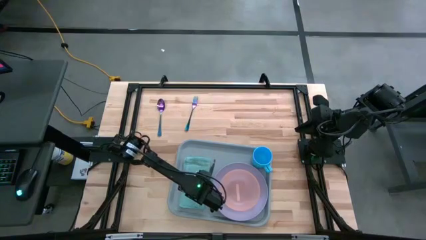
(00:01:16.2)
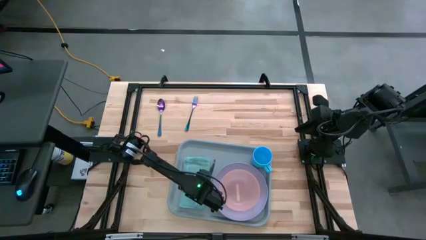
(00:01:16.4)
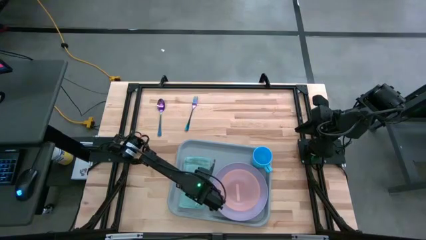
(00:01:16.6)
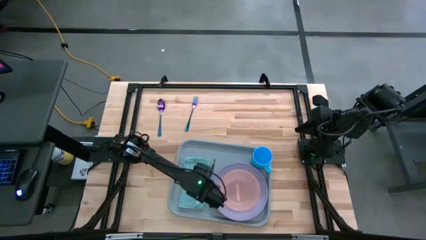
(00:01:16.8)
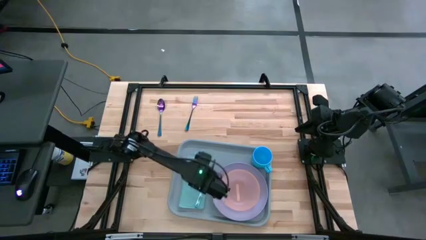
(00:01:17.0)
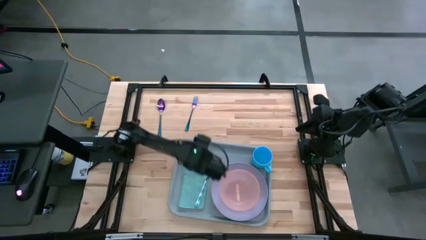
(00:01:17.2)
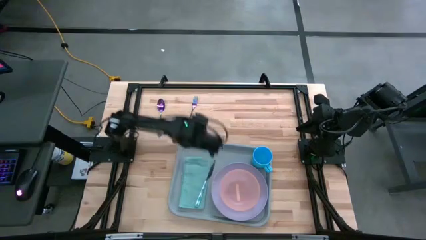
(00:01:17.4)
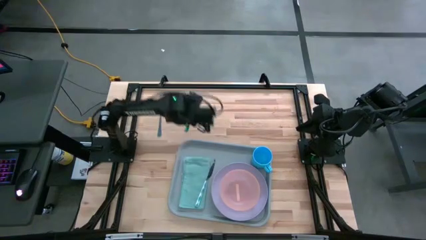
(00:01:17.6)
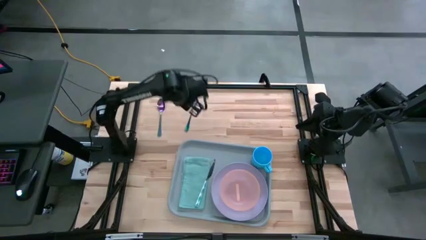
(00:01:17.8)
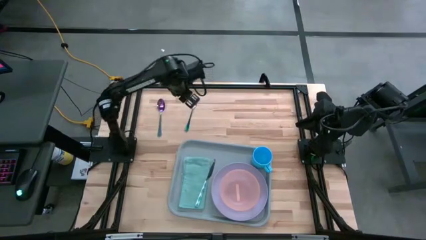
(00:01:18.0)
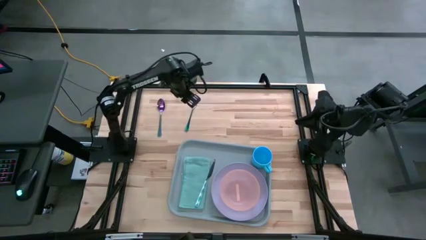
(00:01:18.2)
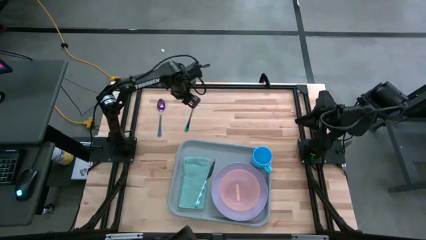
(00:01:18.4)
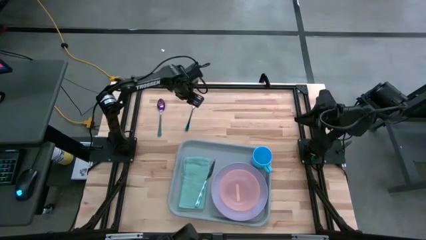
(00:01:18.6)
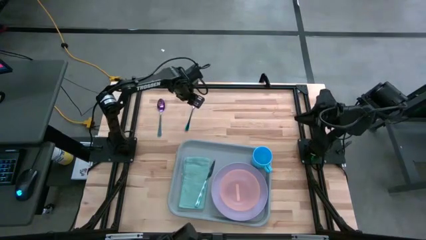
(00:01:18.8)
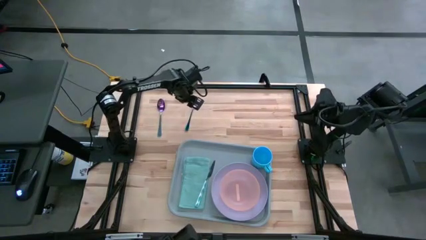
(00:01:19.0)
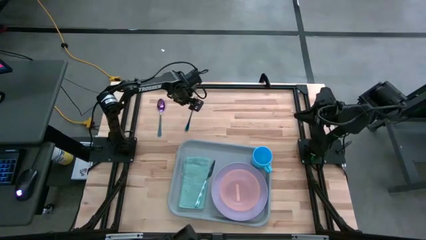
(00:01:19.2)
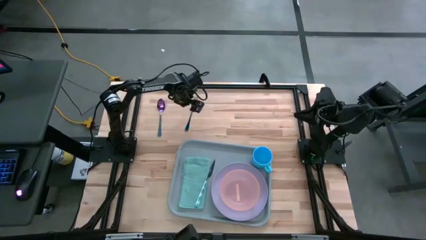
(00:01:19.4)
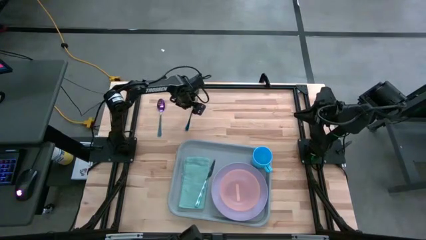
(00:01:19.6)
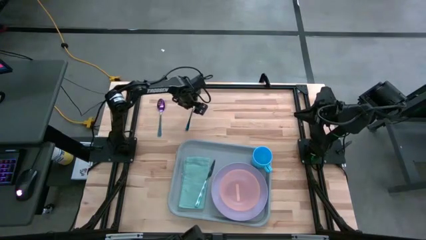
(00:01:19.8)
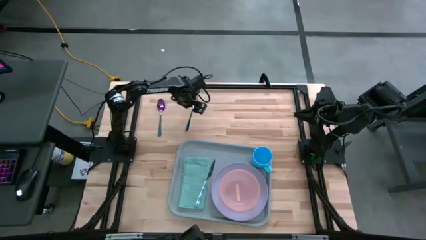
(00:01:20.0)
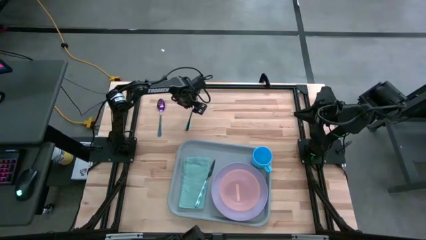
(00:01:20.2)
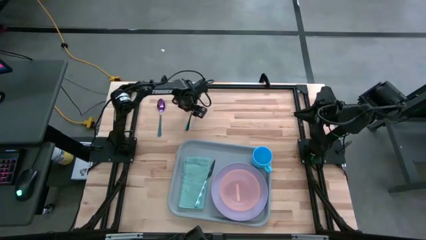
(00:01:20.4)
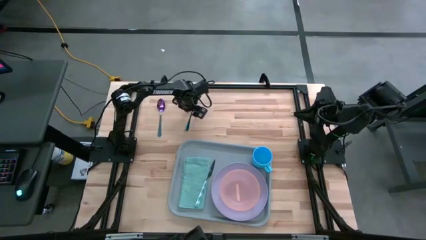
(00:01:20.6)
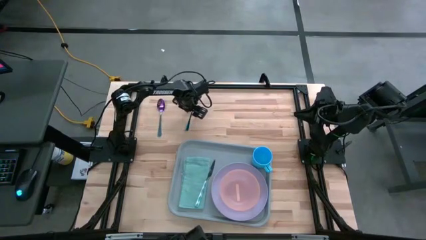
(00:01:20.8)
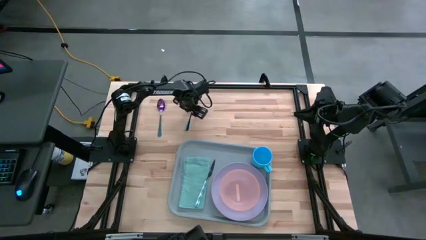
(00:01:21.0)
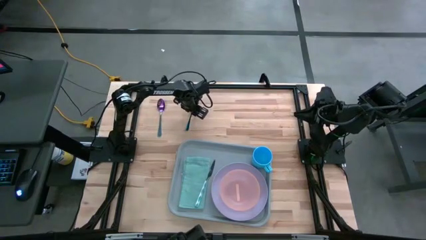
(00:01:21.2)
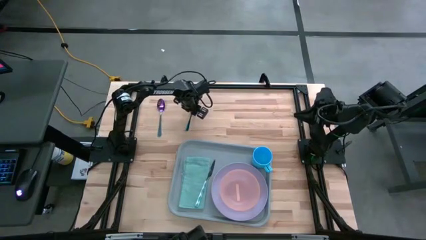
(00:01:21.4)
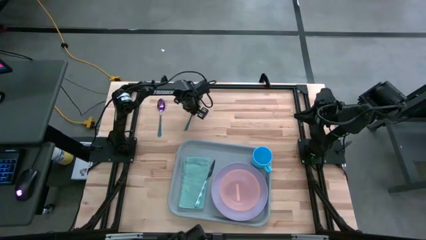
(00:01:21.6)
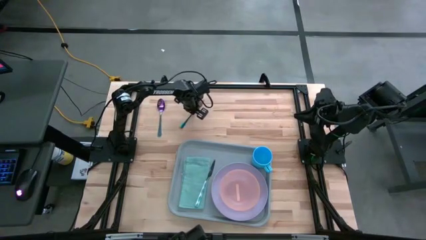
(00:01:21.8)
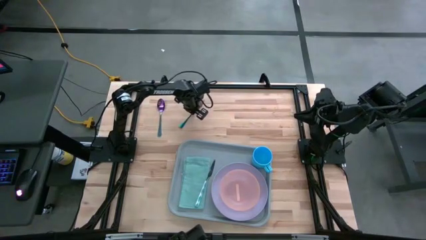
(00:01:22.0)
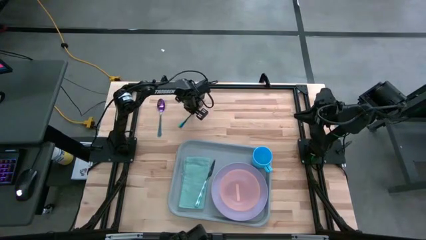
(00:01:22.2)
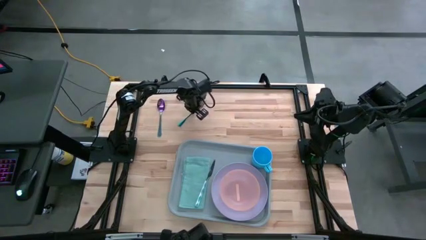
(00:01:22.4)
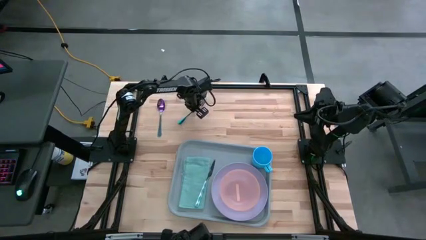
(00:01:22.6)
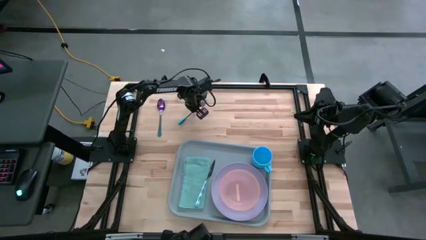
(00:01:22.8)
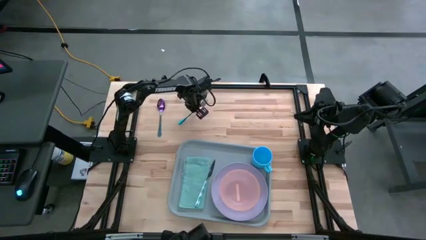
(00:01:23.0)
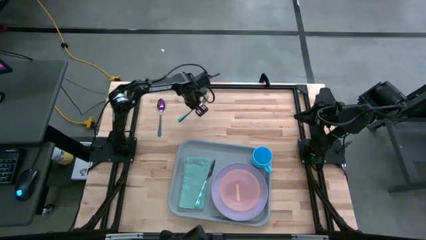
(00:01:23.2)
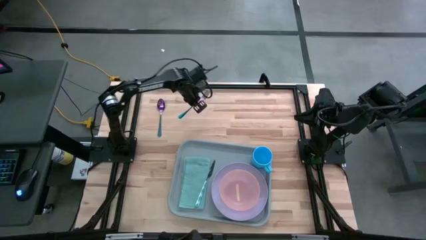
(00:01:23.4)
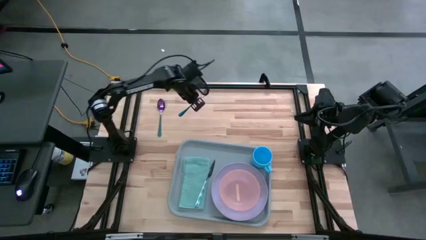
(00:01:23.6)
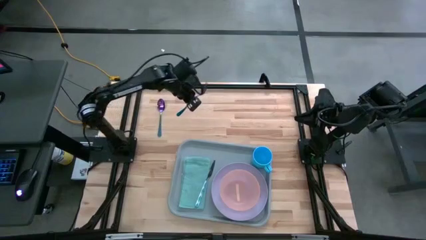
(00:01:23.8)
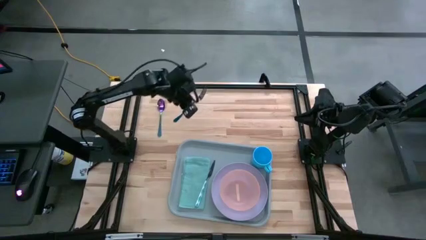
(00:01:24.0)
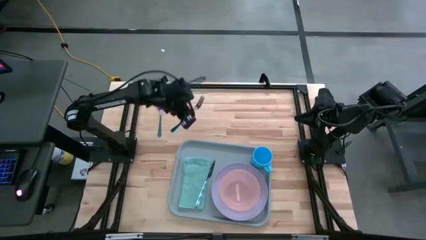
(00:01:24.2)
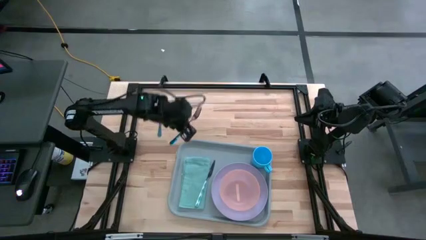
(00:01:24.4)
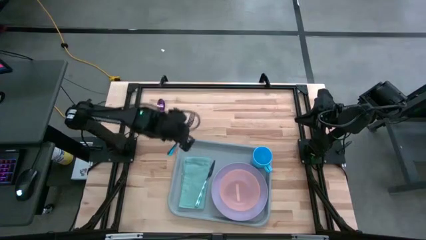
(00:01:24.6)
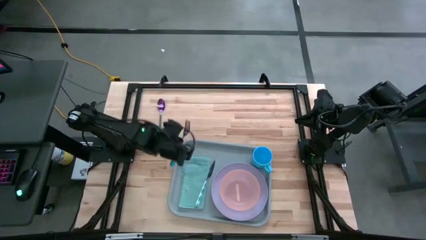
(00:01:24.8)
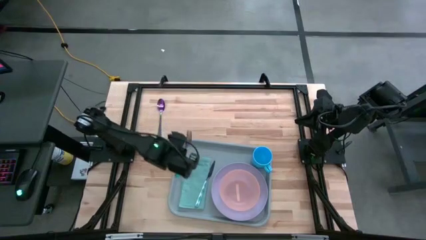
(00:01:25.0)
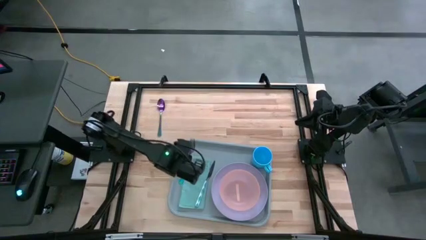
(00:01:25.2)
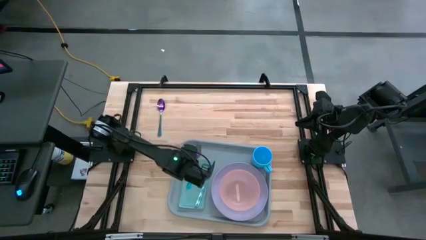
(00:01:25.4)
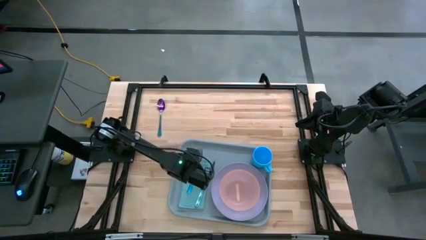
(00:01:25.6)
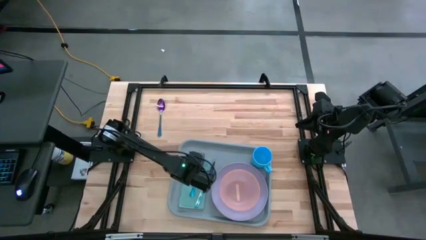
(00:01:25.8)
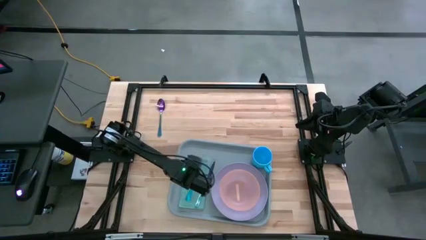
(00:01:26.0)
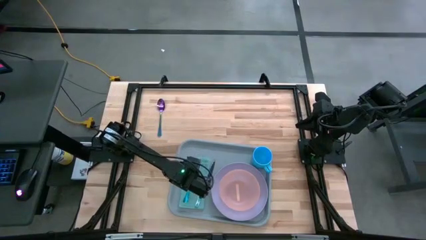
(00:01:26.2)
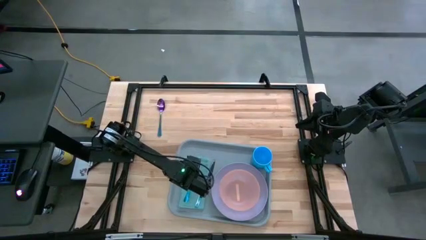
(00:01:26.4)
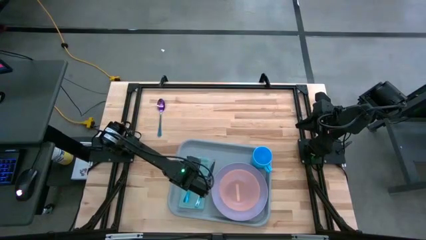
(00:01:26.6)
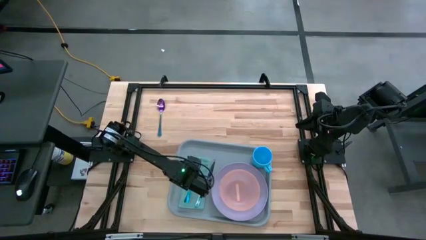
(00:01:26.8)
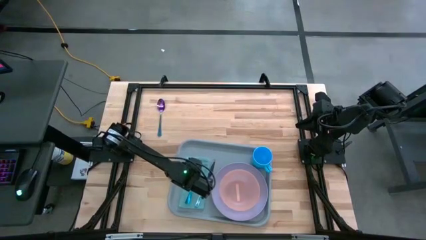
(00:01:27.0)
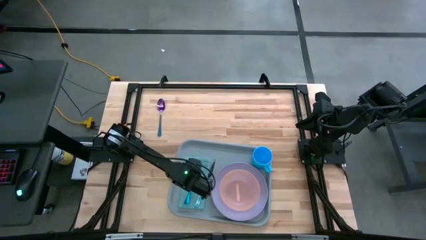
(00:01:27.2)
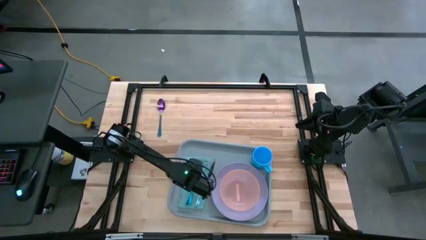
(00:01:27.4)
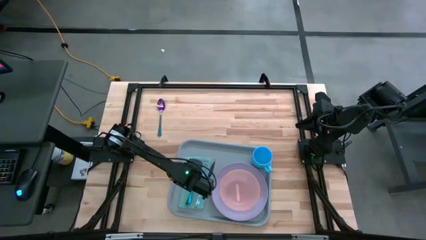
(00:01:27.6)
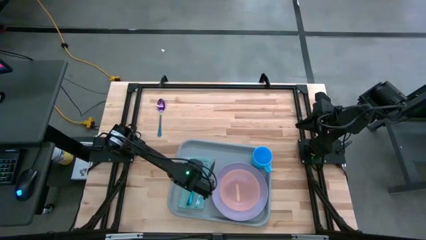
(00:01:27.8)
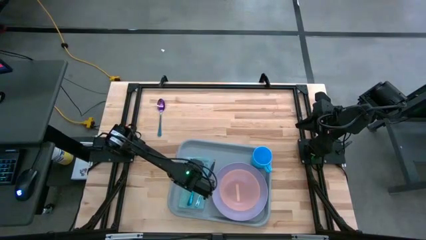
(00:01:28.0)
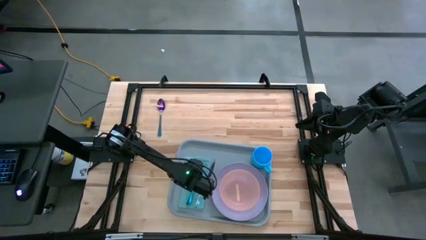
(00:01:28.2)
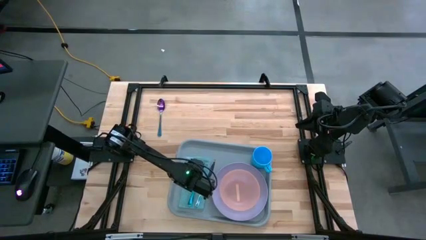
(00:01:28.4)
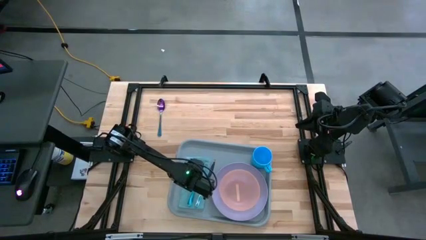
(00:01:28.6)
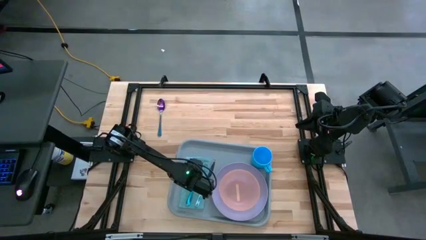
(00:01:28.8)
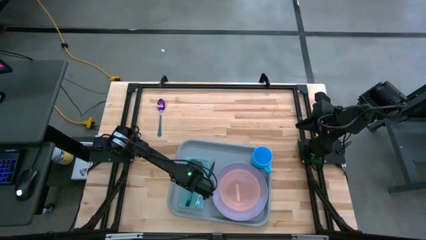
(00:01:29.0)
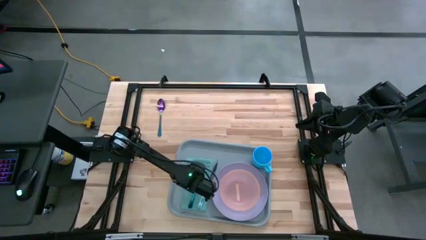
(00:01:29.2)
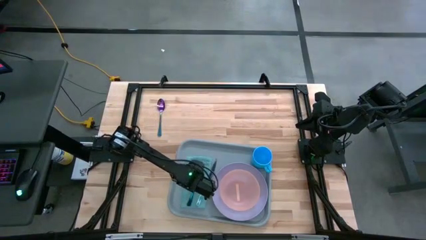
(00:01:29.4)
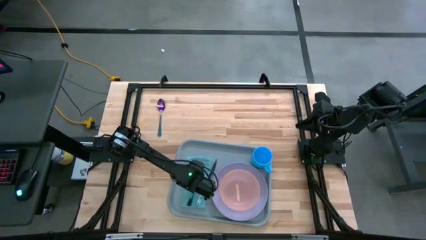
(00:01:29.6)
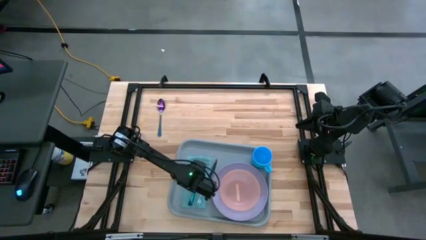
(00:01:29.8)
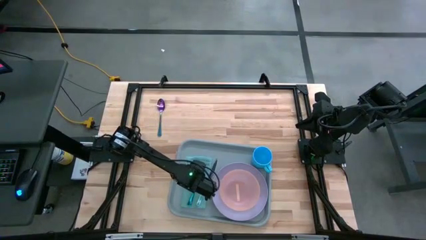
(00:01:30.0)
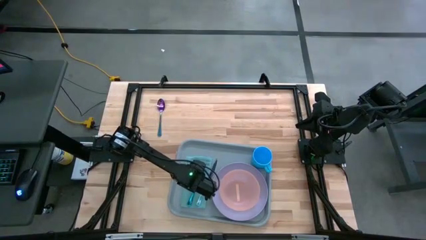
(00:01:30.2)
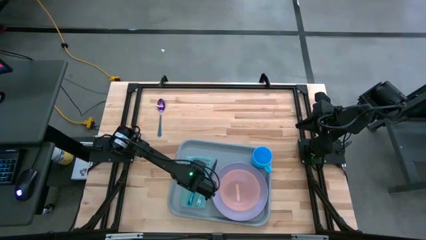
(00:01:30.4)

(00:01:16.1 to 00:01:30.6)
Task: Set up tray
Put the blue fork on the blue napkin to the left of the green knife
